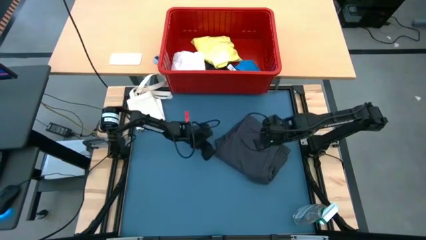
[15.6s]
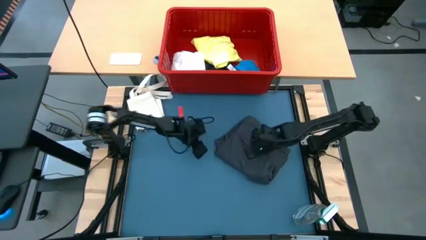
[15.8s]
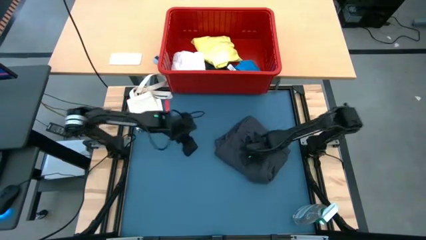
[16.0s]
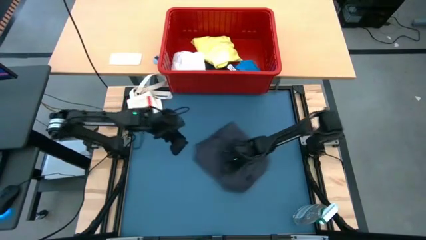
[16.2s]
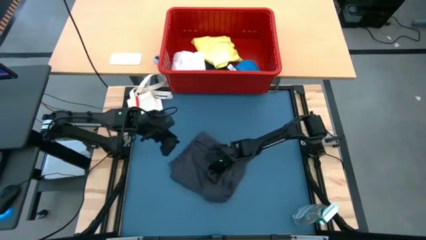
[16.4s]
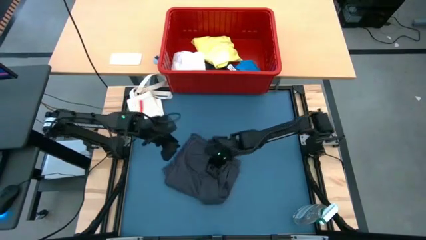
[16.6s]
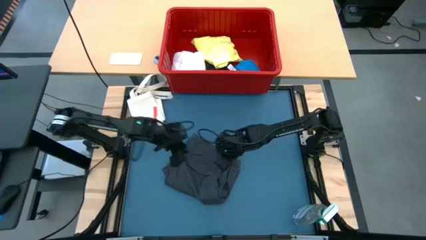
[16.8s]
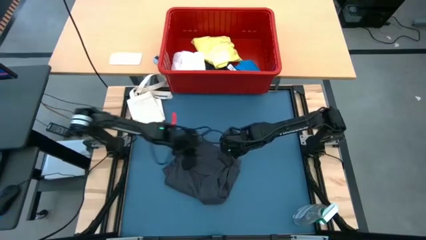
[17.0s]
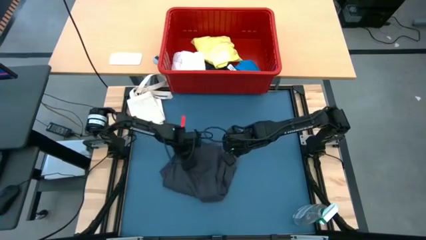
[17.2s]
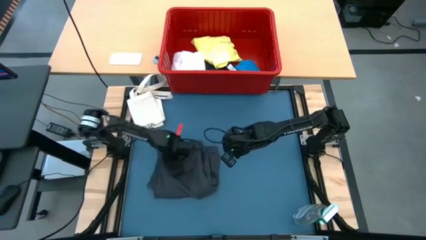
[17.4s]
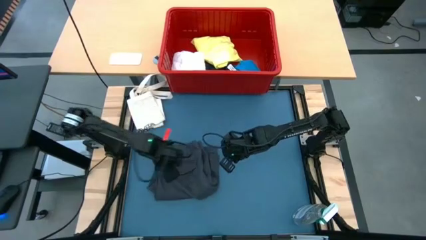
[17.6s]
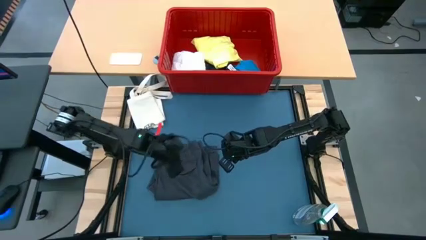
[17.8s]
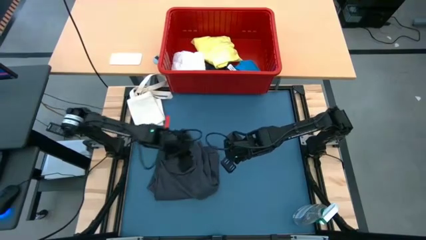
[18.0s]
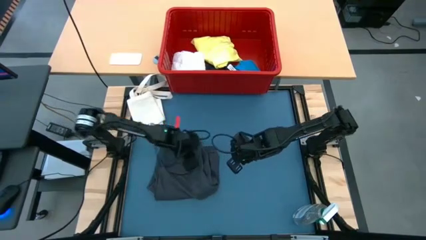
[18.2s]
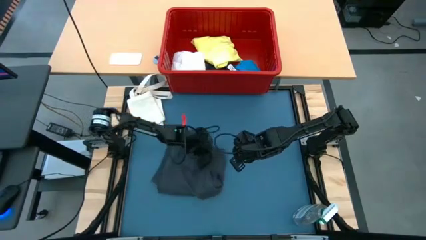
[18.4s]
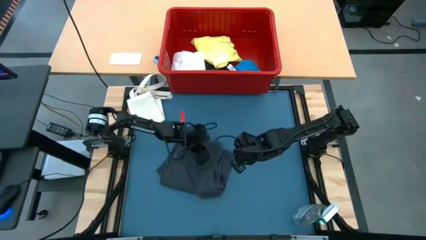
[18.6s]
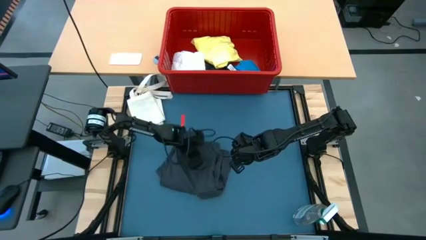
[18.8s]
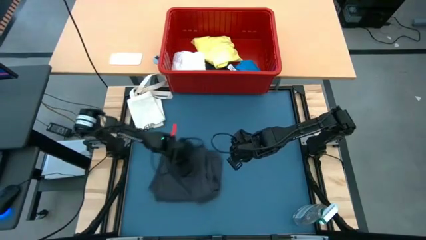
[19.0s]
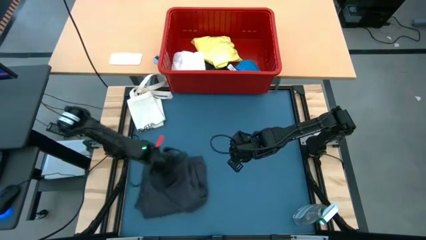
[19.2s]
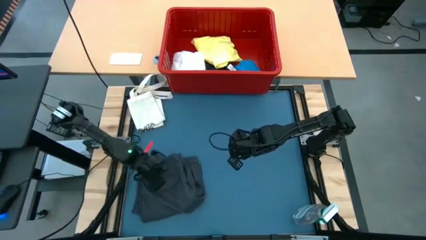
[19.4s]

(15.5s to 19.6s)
Task: Fold laundry
Move the gray shorts to the bottom left of the table

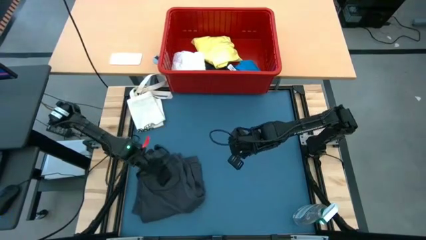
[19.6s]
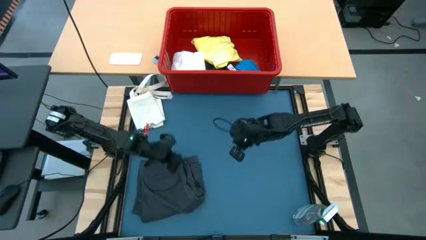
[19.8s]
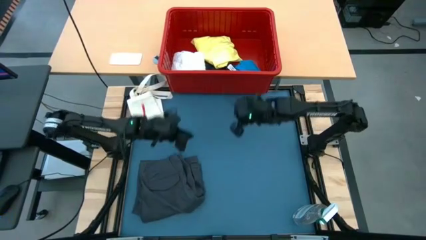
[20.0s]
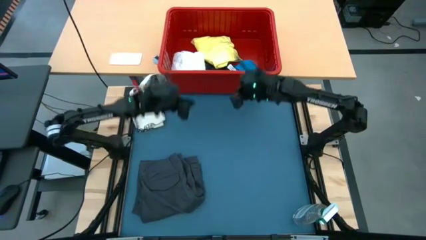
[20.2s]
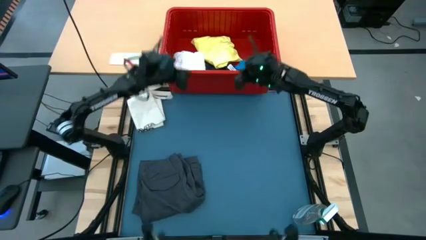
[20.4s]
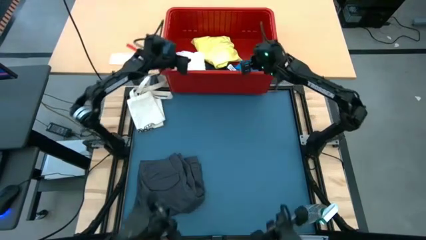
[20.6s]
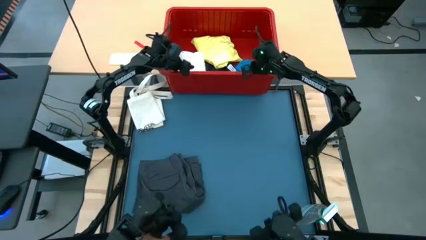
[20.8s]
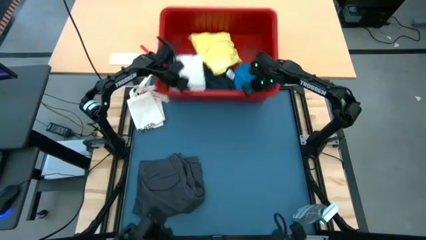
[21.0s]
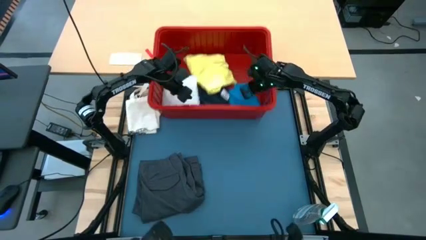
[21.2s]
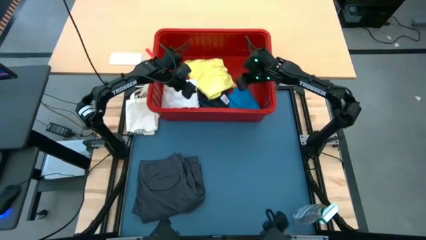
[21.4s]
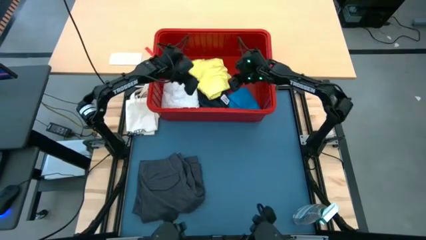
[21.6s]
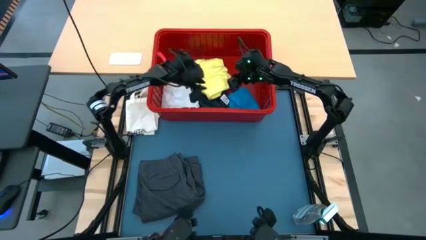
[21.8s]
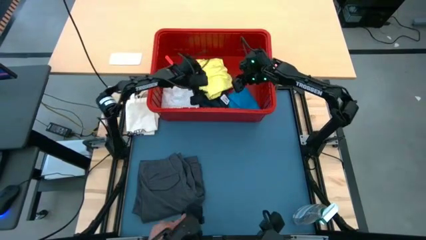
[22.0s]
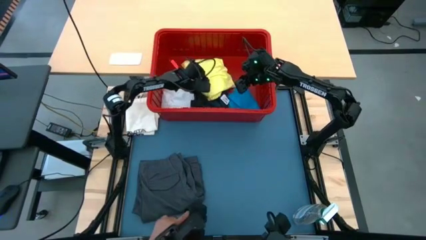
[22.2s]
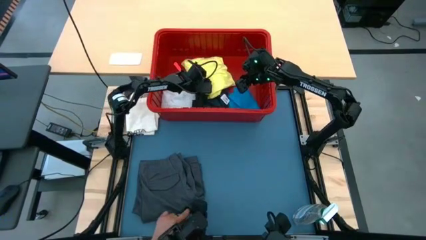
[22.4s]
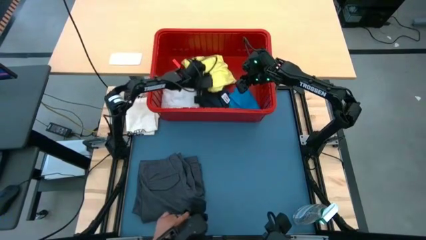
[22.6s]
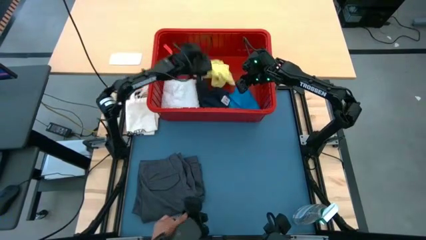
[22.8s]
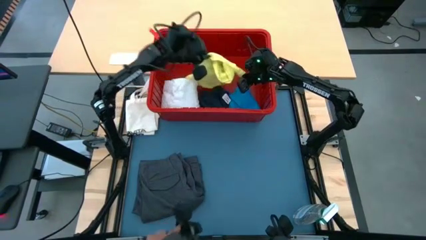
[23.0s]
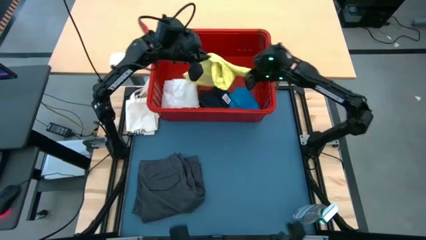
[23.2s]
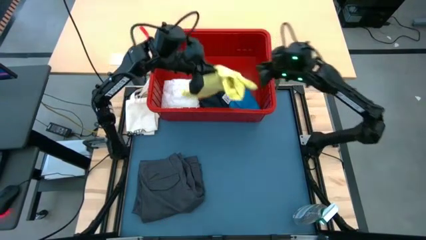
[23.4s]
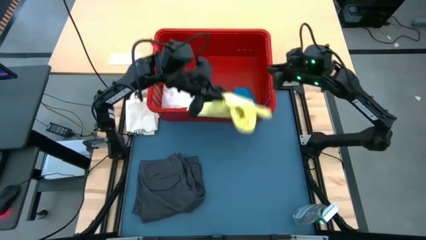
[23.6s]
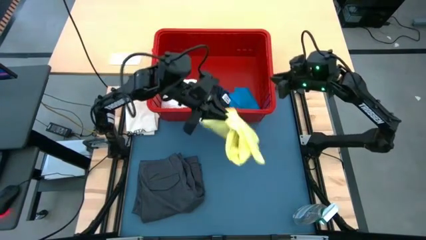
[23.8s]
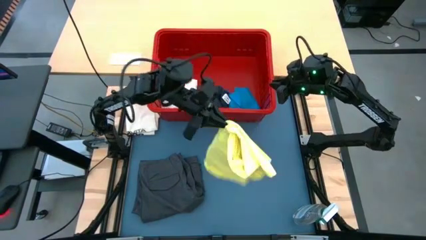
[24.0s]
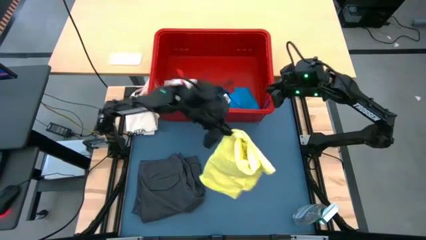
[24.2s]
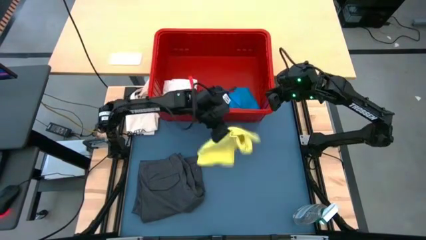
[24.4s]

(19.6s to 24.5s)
Remove the yellow shirt from the bin

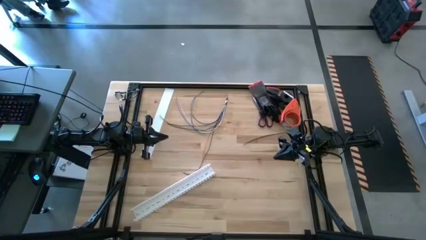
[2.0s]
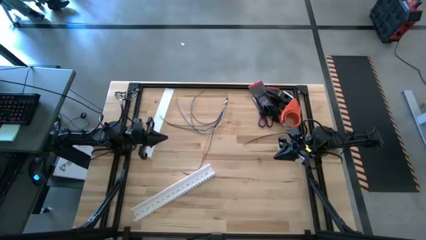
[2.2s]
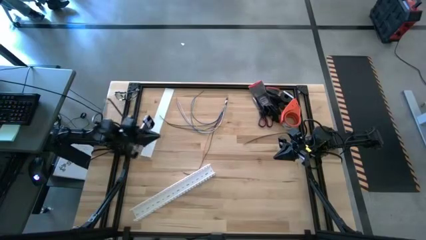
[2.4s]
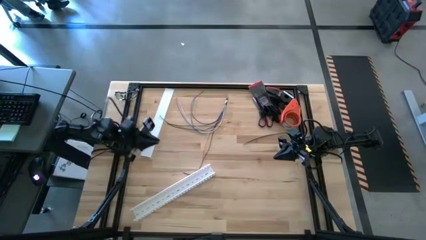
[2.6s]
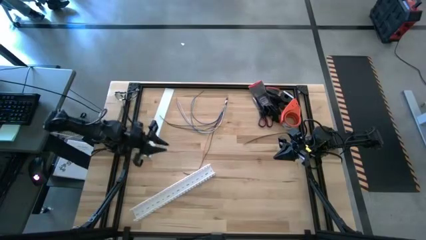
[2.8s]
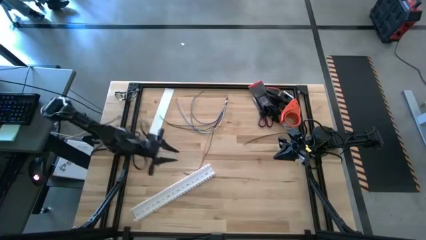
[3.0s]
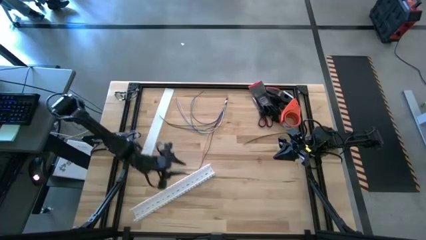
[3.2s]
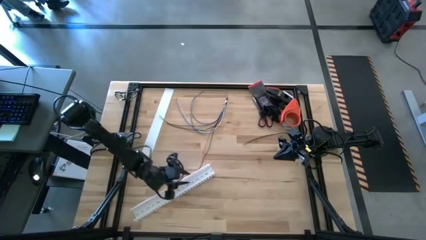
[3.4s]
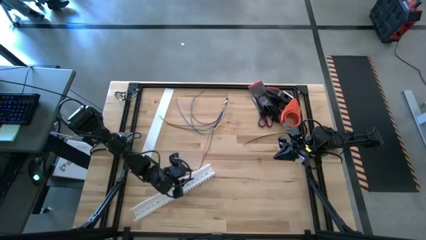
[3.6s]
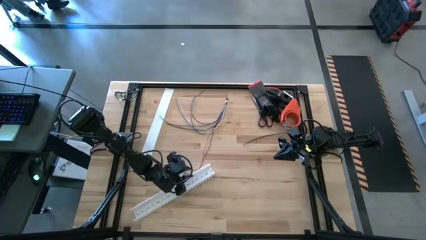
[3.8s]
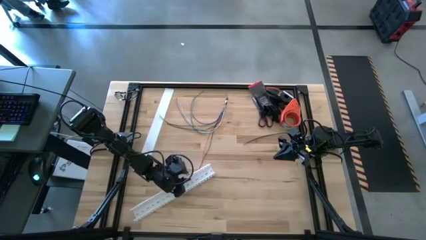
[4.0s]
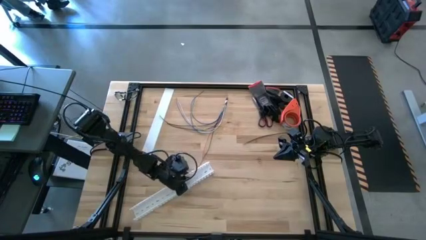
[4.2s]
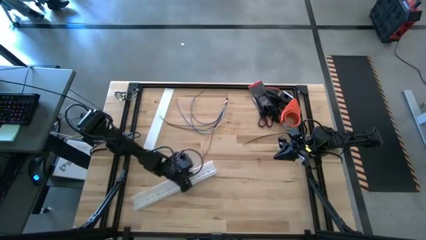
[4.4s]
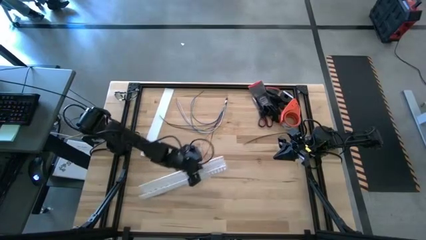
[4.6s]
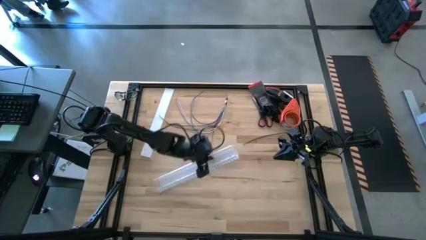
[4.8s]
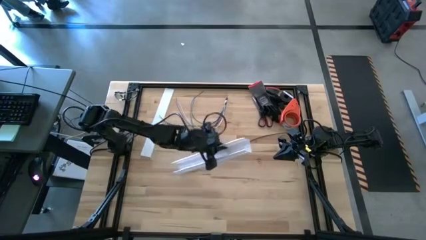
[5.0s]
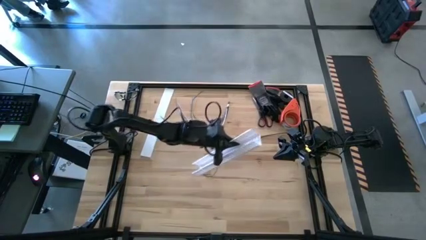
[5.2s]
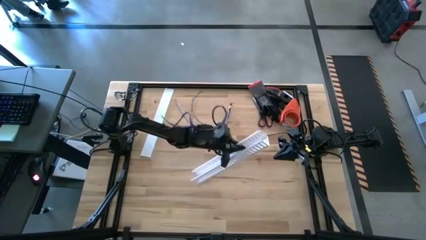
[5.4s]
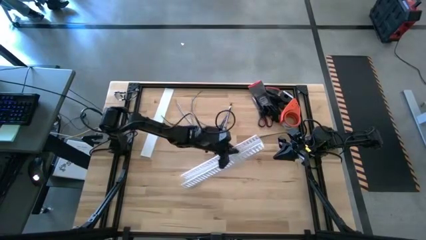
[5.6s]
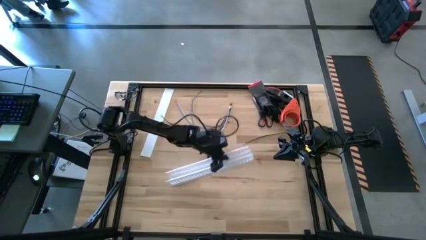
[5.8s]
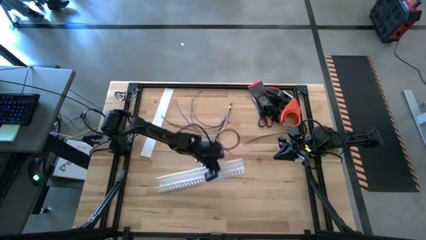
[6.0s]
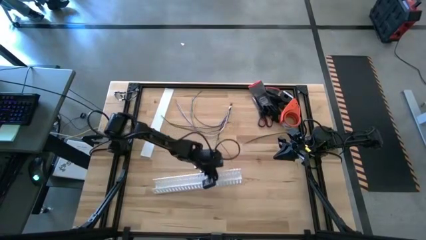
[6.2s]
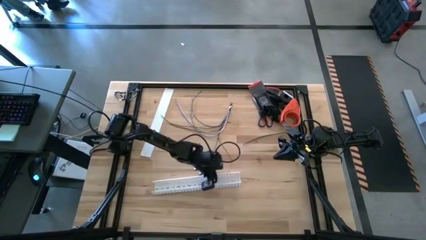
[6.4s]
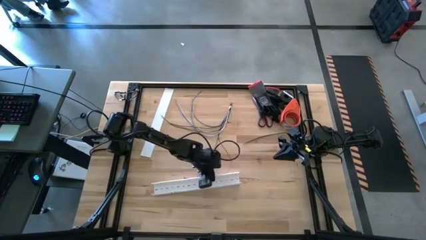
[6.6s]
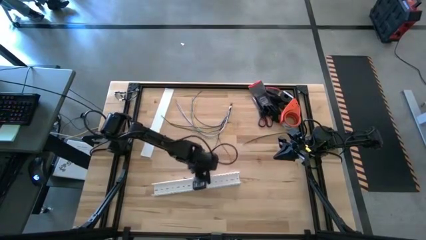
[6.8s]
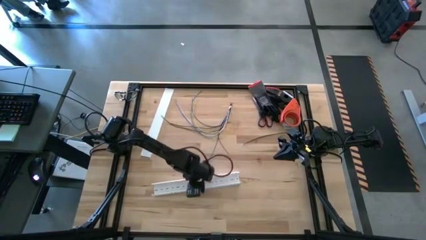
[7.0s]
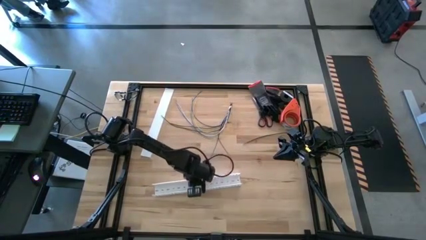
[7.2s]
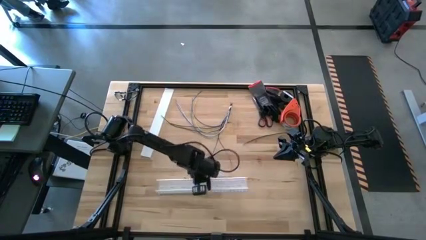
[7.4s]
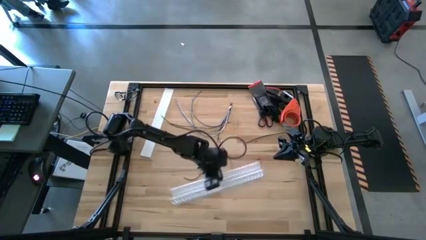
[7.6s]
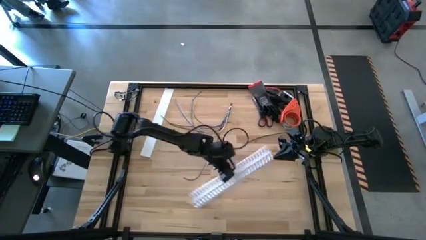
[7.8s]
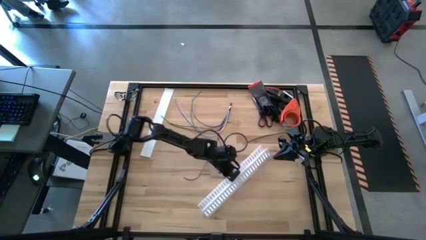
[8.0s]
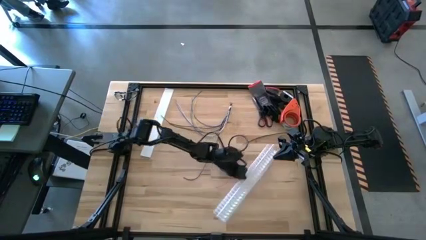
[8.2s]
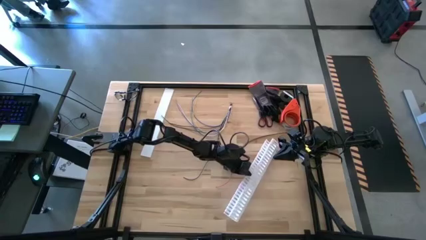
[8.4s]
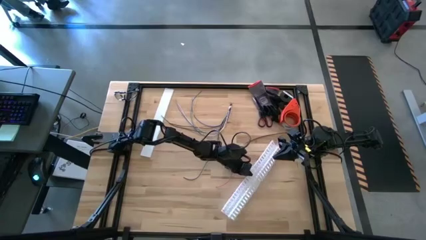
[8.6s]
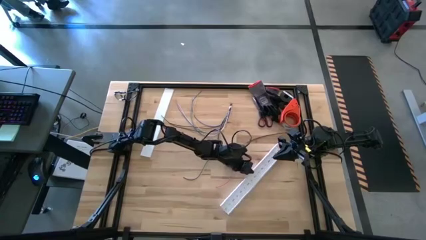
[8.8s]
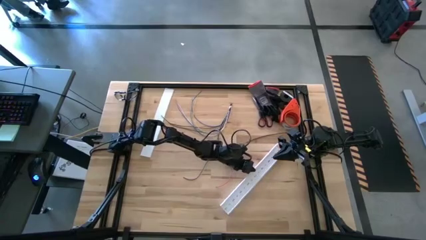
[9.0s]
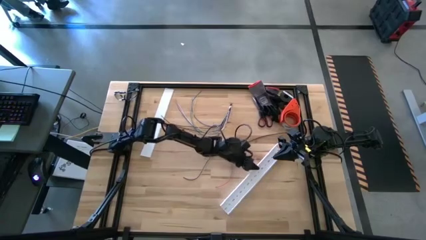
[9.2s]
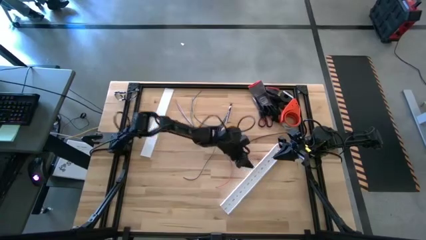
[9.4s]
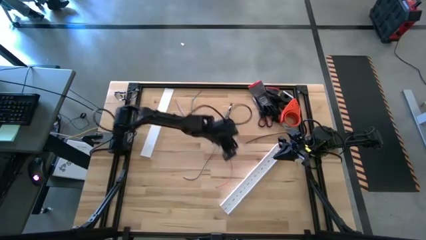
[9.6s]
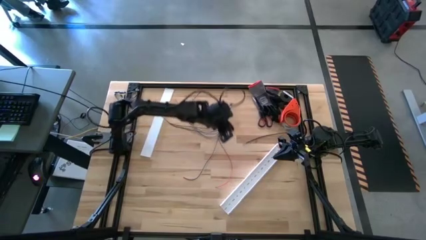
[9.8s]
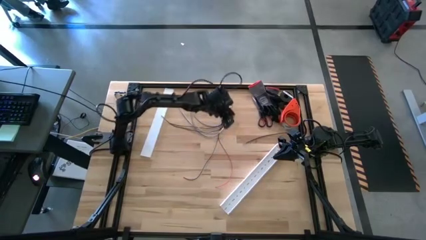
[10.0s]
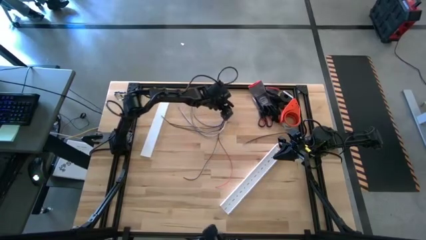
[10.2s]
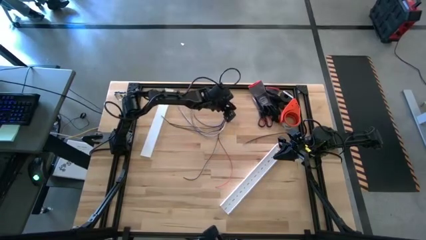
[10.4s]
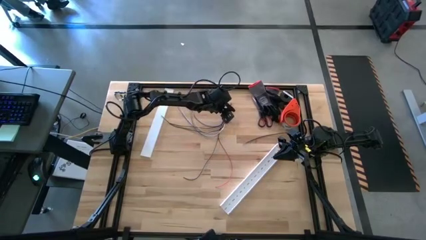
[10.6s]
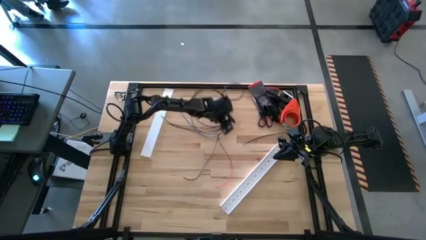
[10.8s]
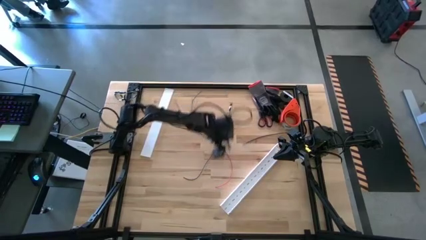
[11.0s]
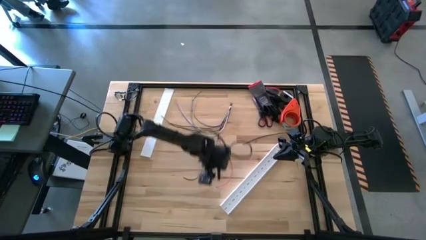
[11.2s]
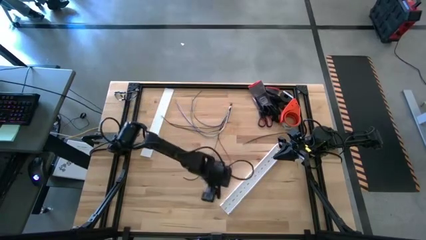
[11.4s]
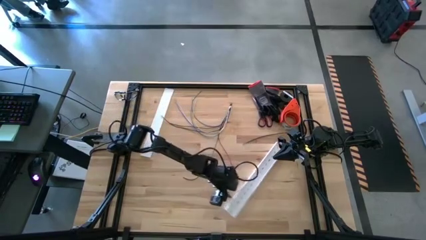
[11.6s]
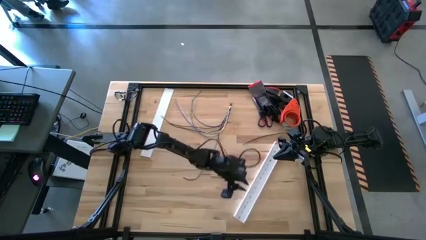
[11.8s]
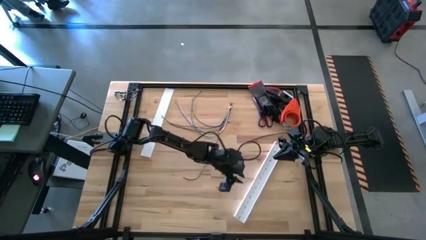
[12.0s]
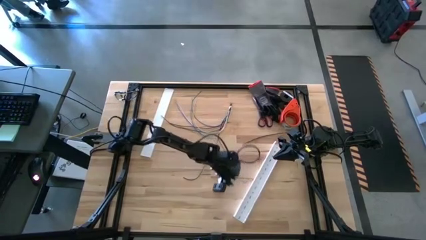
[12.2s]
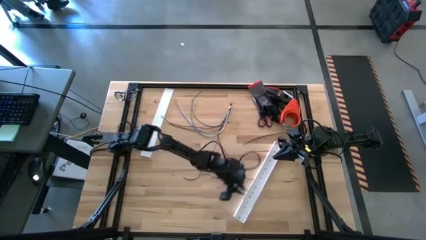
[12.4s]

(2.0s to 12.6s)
Task: Ziptie cables
Move the white cable duct to the middle right of the table
